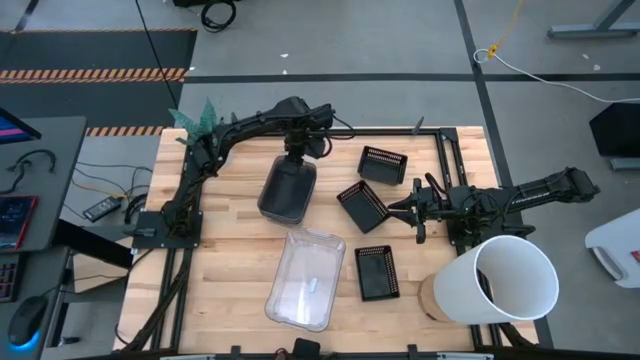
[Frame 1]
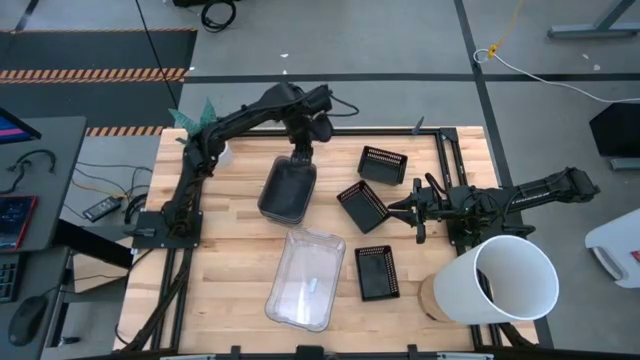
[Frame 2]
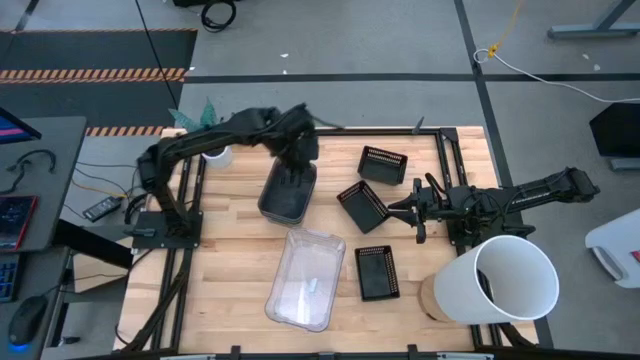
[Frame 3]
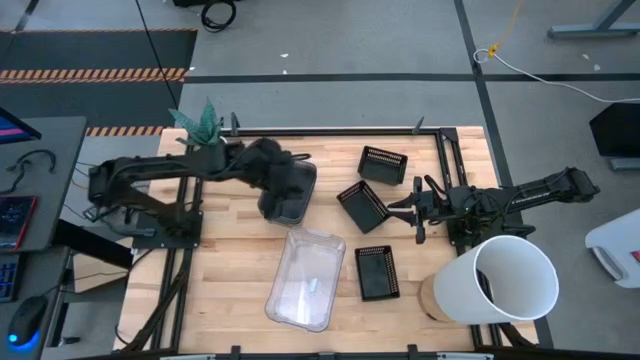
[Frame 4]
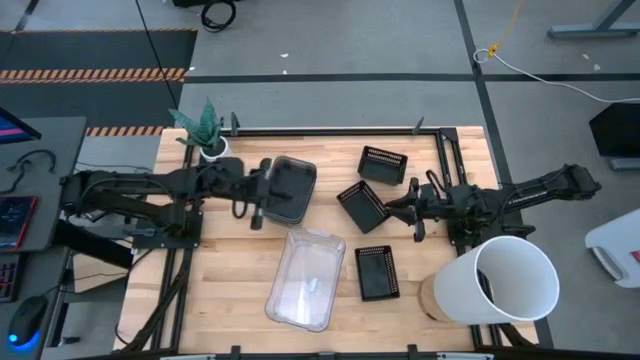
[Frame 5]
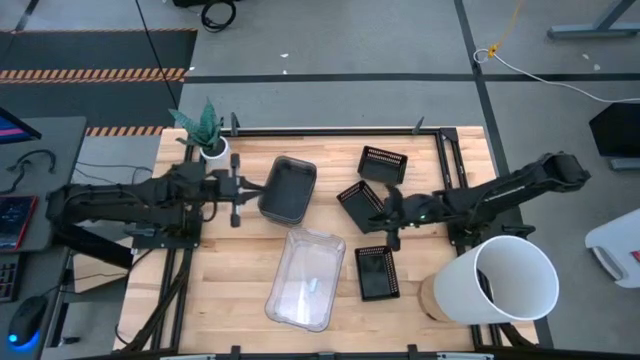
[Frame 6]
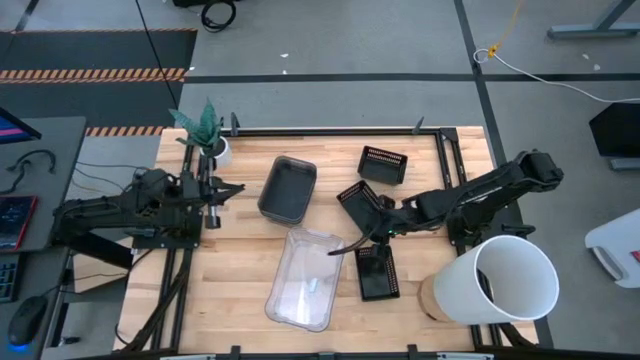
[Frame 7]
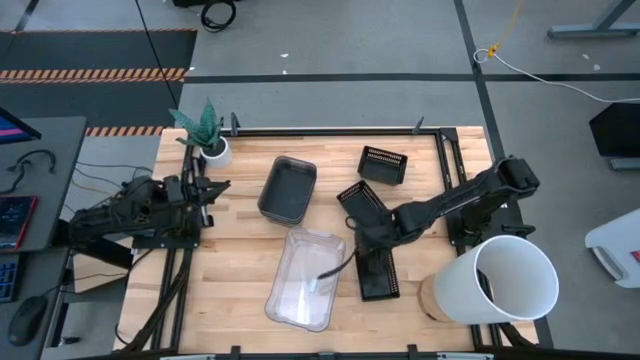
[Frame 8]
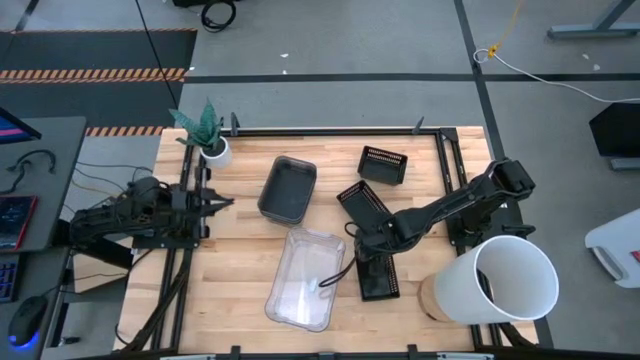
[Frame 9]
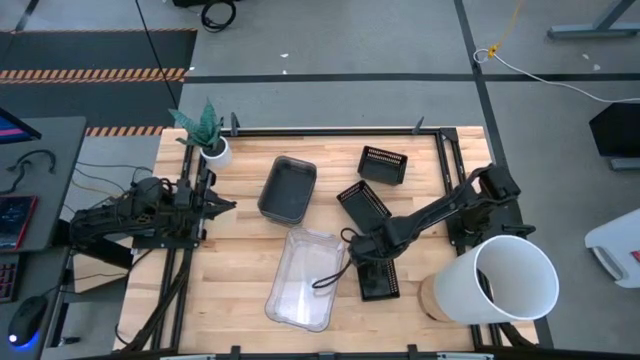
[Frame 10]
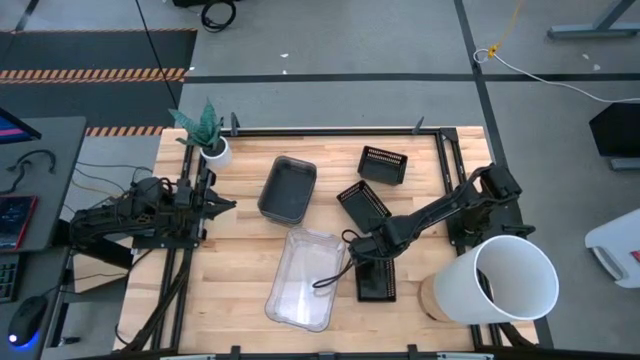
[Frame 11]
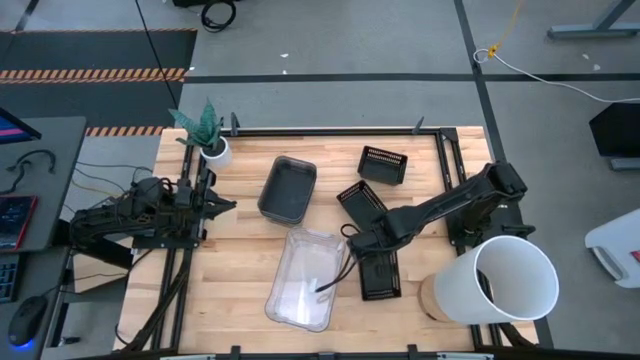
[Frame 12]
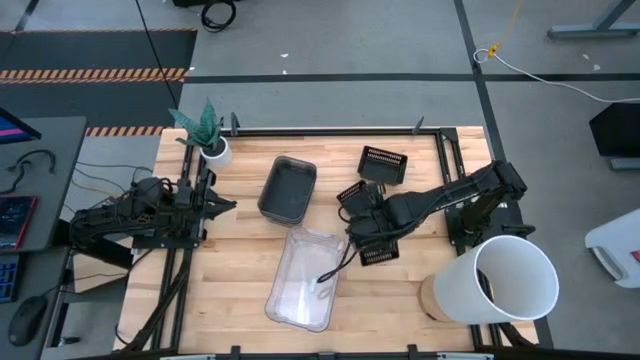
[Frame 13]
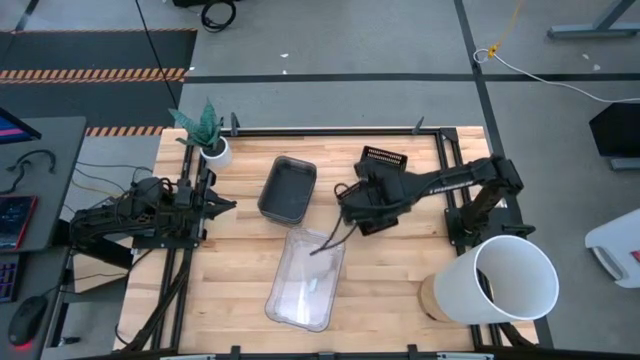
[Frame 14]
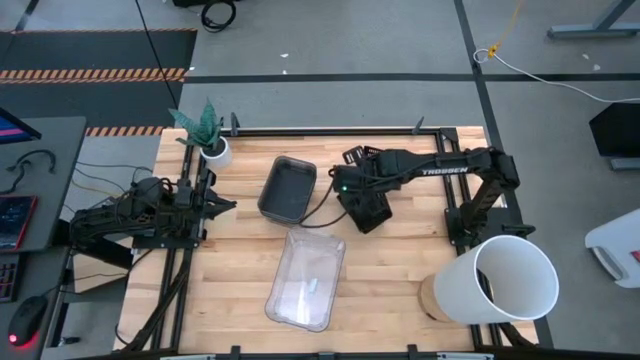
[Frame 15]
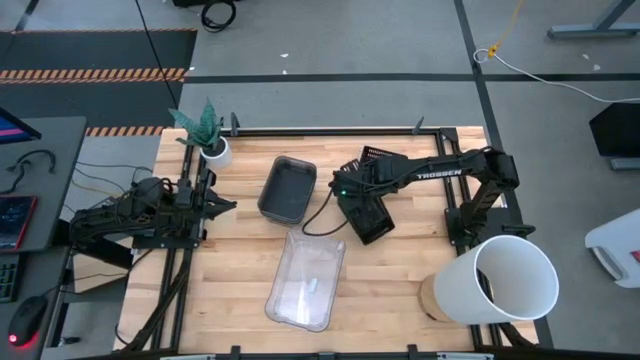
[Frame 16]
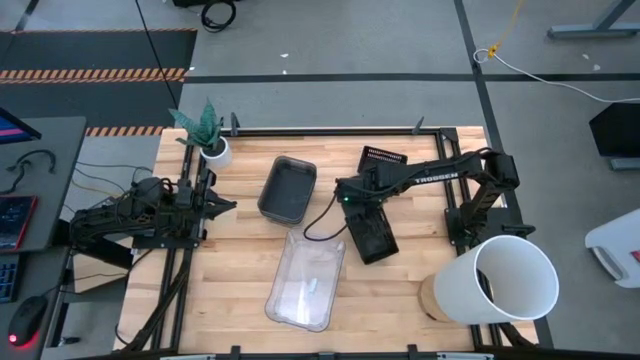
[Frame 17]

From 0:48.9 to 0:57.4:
Stack the bottom black basket on top of the middle black basket

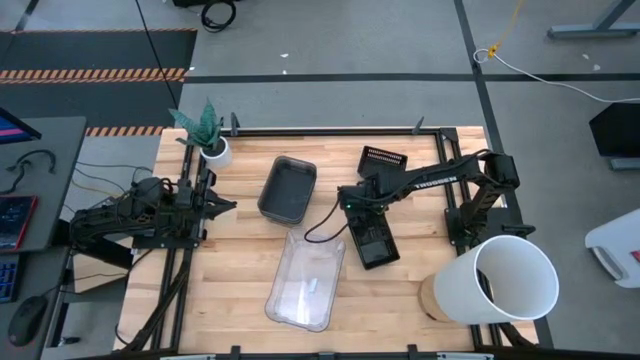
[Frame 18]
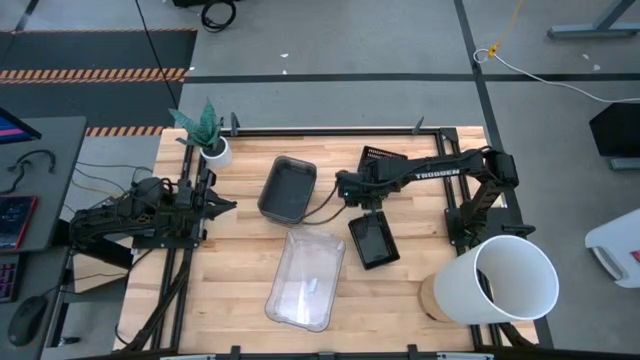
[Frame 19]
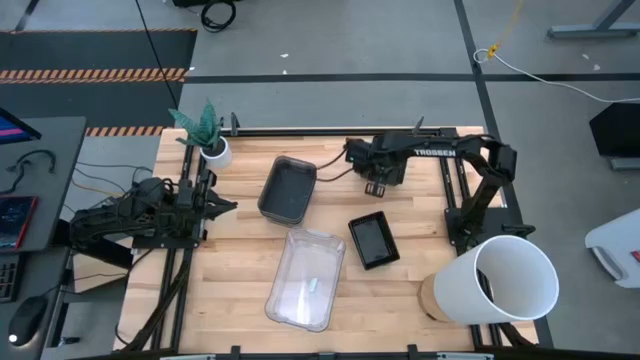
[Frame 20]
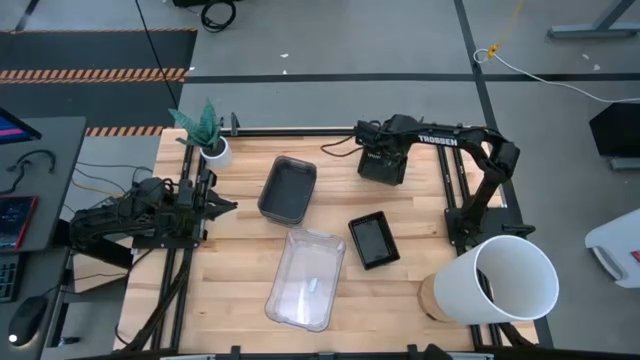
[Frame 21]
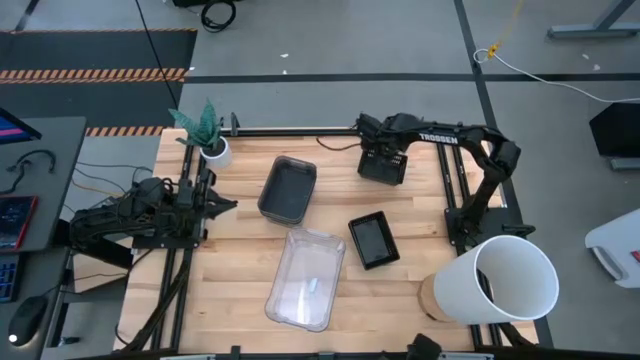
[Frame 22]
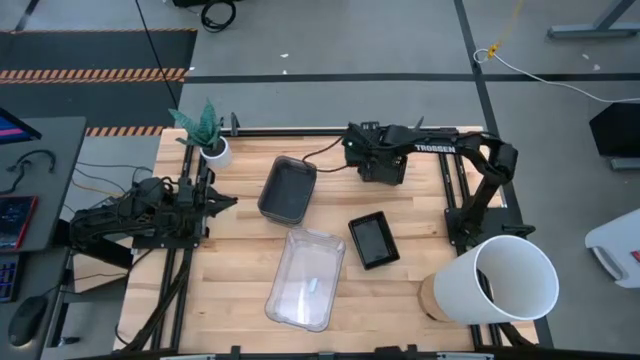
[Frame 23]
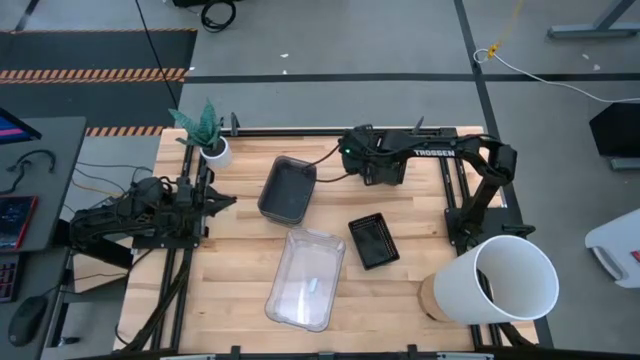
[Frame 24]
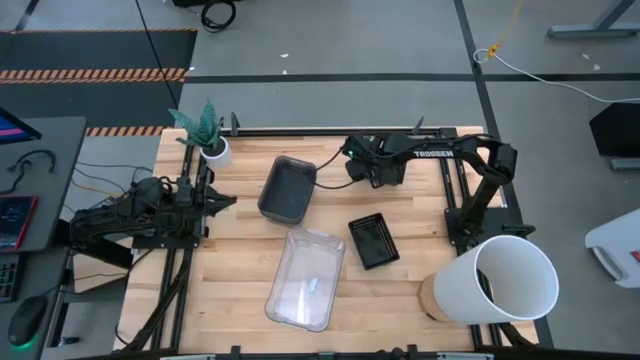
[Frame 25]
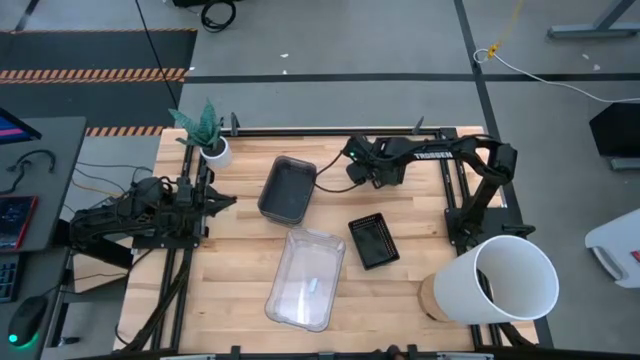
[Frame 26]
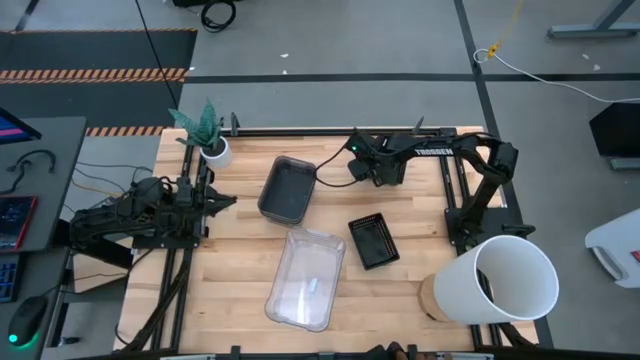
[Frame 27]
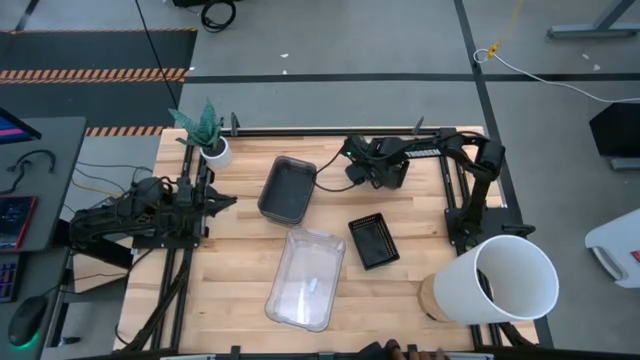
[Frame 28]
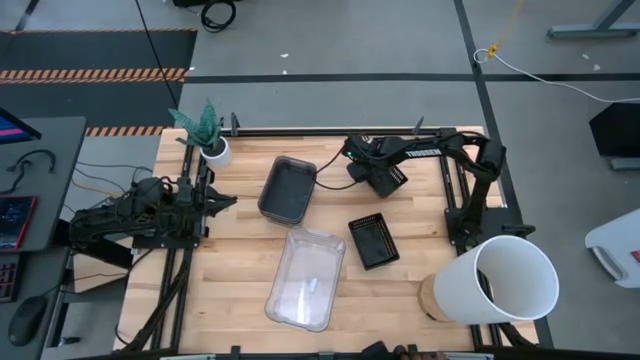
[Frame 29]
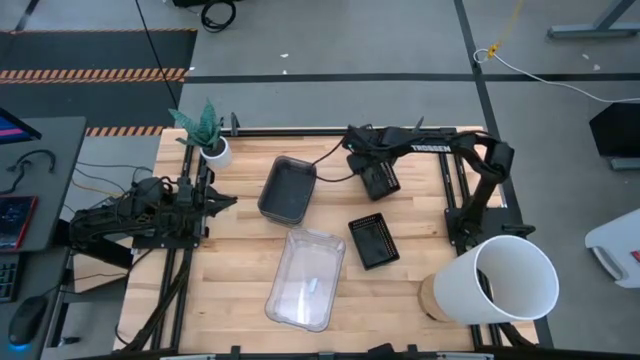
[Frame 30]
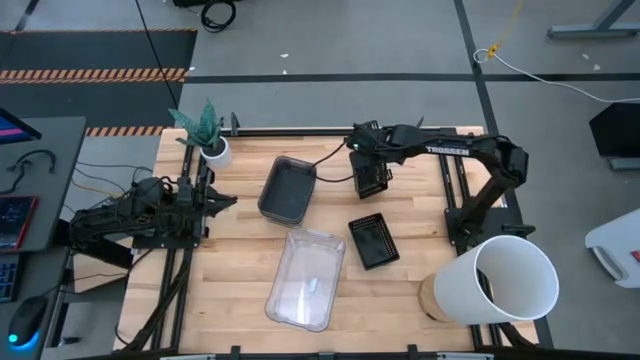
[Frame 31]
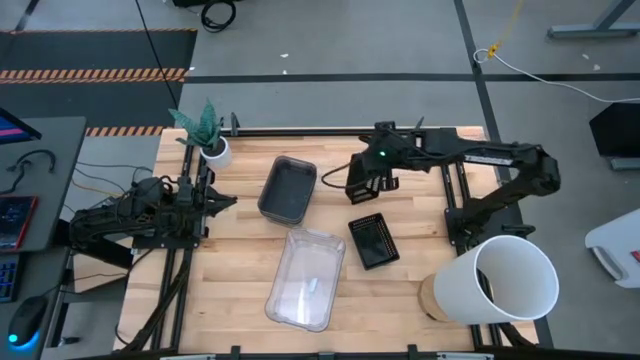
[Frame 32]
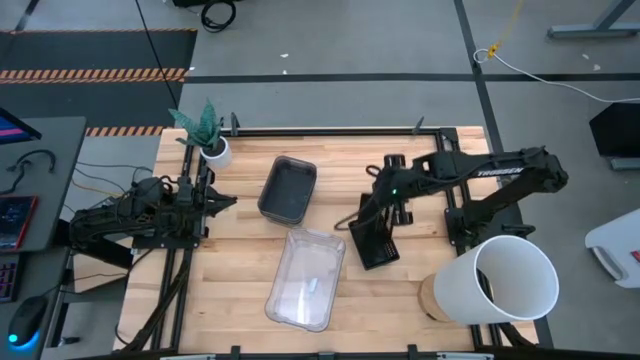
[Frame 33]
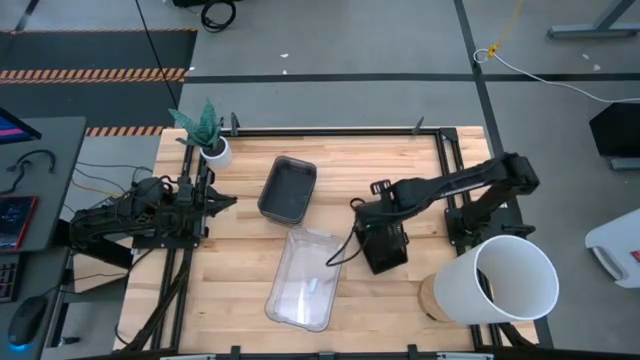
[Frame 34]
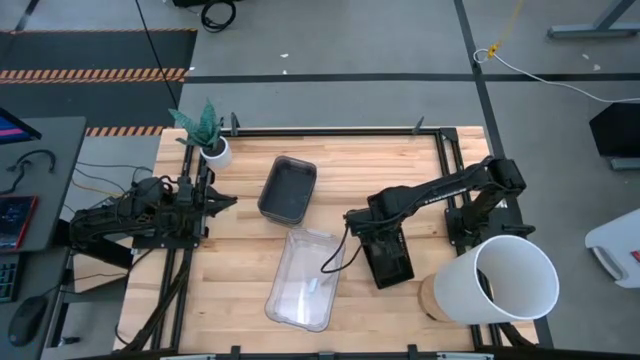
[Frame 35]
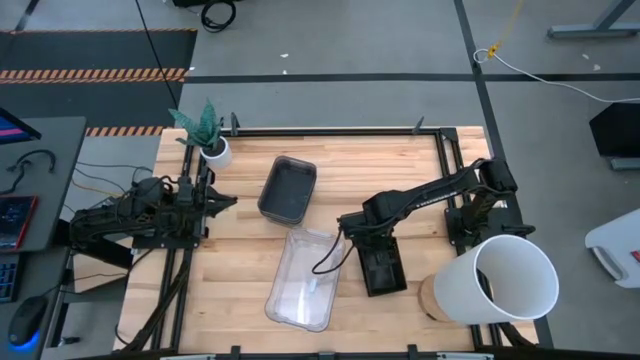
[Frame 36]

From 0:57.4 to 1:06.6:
Stack the top black basket on the bottom black baskets
